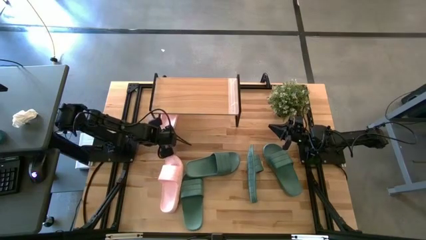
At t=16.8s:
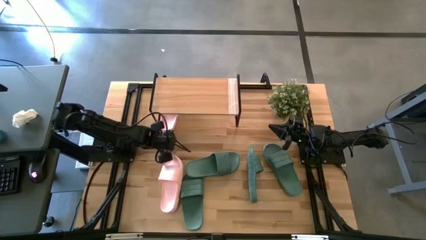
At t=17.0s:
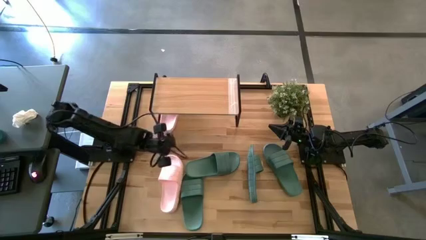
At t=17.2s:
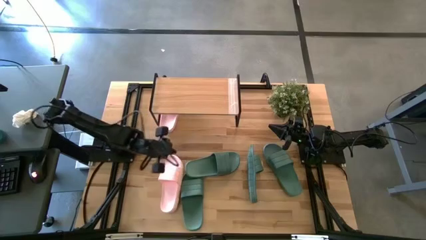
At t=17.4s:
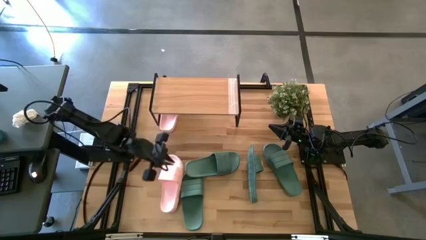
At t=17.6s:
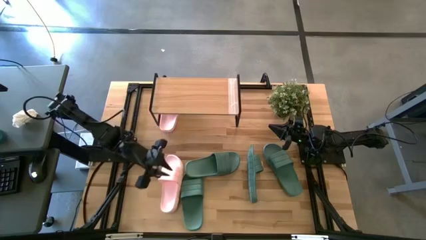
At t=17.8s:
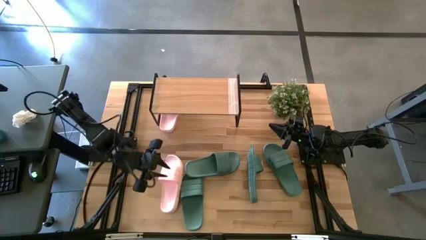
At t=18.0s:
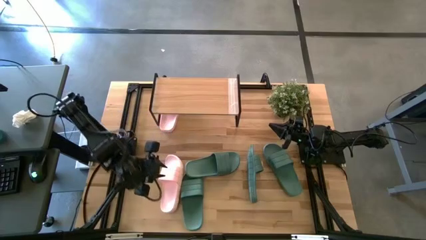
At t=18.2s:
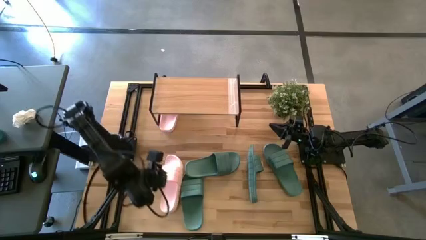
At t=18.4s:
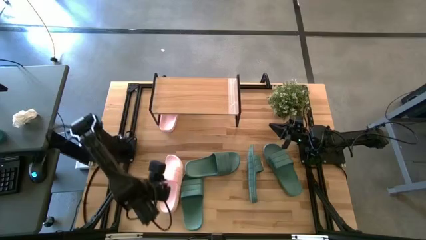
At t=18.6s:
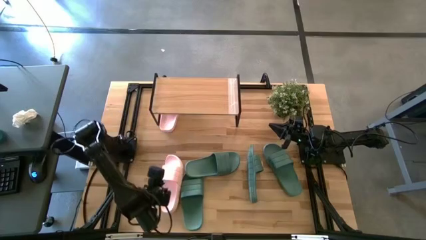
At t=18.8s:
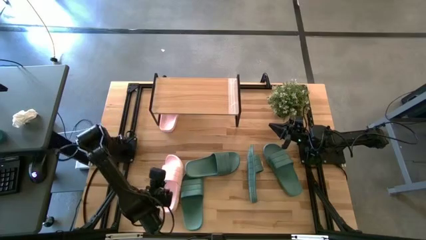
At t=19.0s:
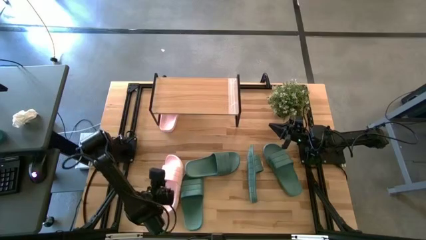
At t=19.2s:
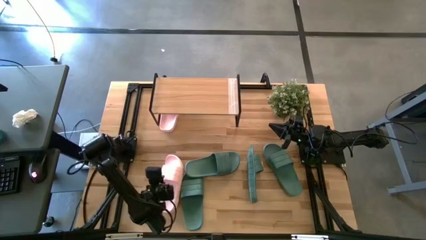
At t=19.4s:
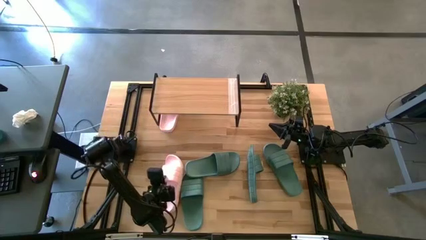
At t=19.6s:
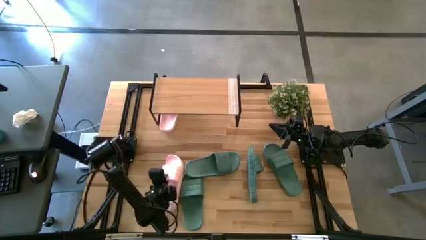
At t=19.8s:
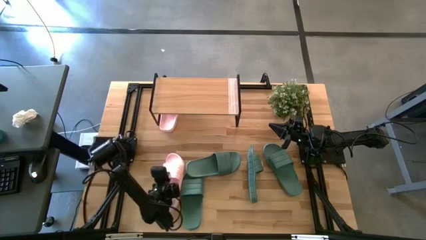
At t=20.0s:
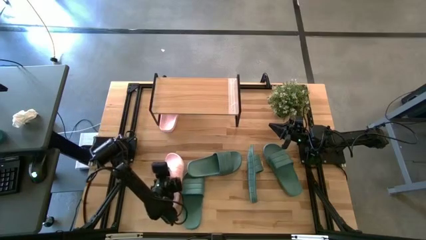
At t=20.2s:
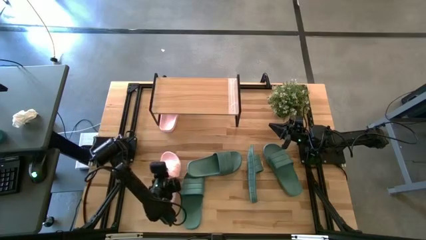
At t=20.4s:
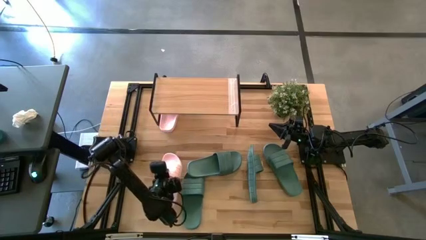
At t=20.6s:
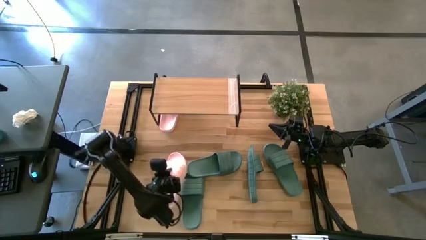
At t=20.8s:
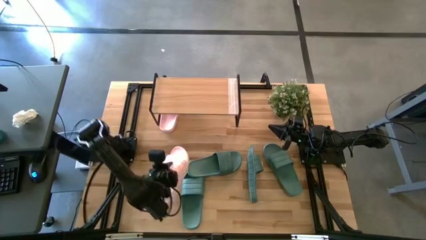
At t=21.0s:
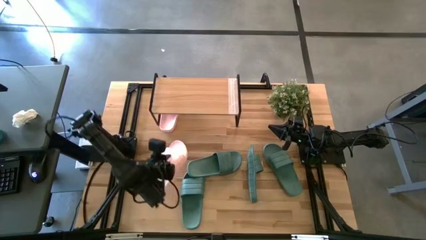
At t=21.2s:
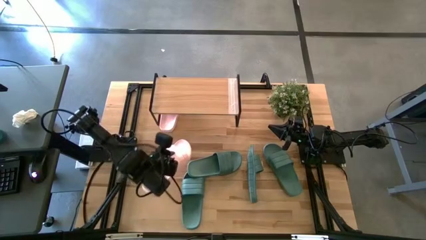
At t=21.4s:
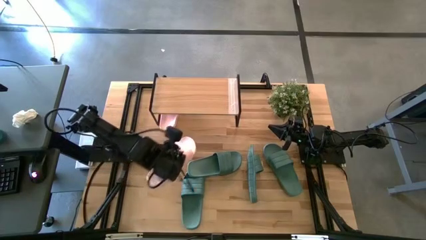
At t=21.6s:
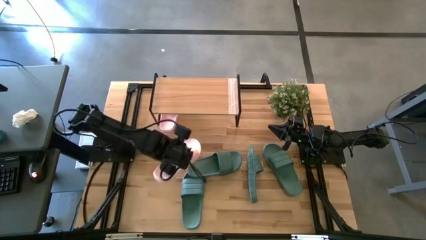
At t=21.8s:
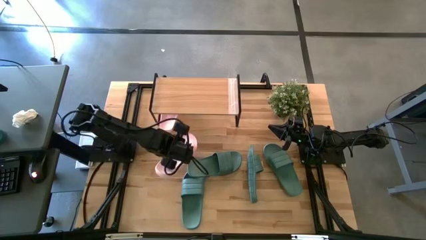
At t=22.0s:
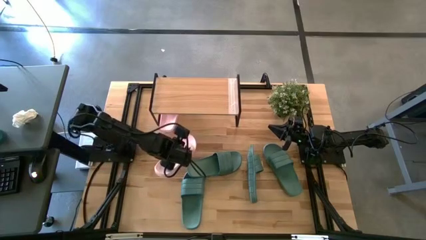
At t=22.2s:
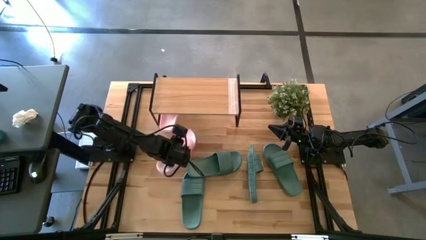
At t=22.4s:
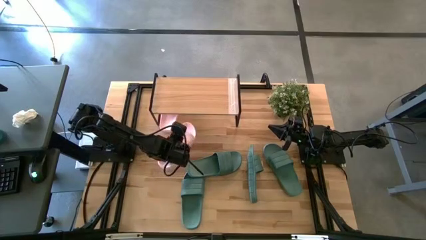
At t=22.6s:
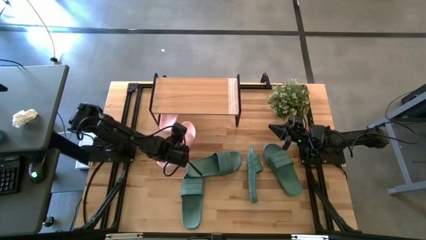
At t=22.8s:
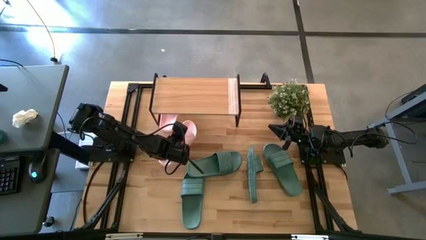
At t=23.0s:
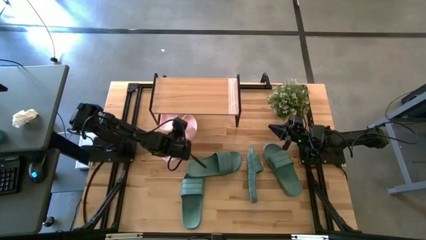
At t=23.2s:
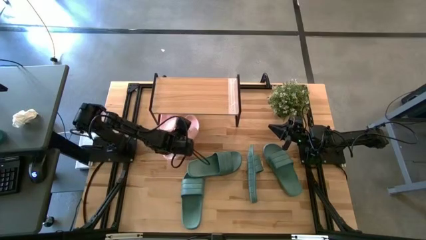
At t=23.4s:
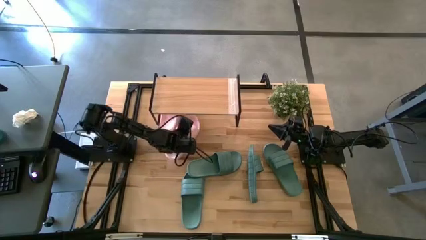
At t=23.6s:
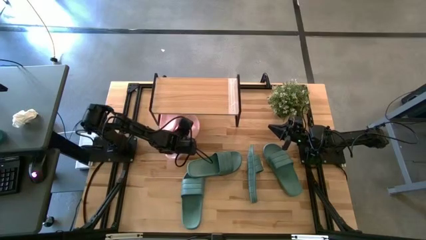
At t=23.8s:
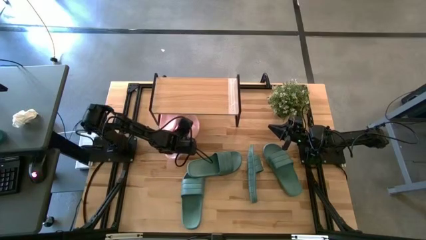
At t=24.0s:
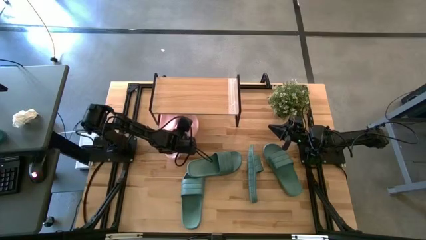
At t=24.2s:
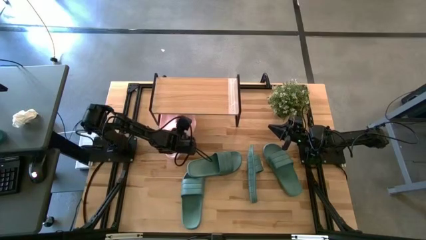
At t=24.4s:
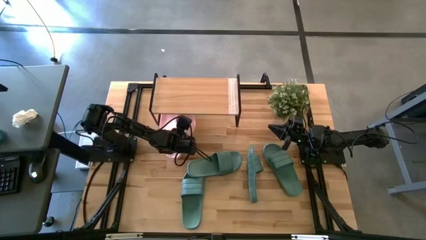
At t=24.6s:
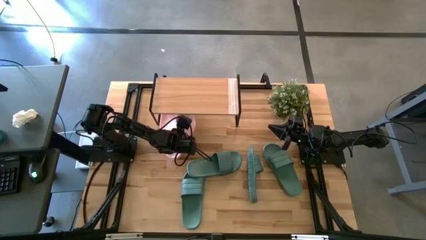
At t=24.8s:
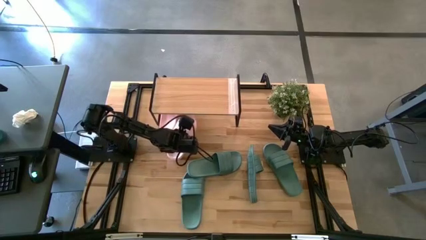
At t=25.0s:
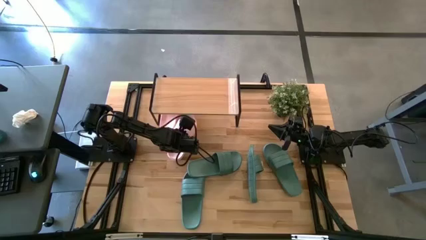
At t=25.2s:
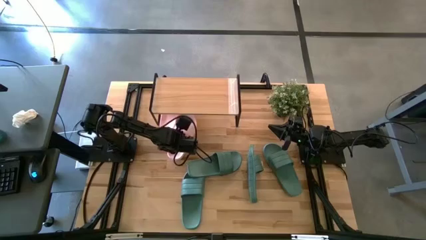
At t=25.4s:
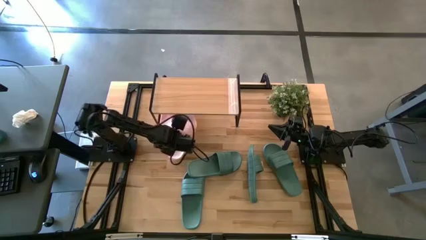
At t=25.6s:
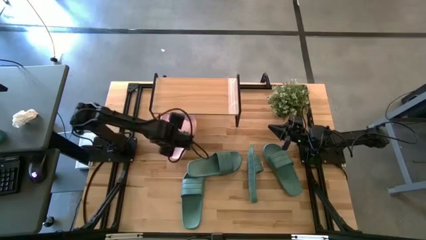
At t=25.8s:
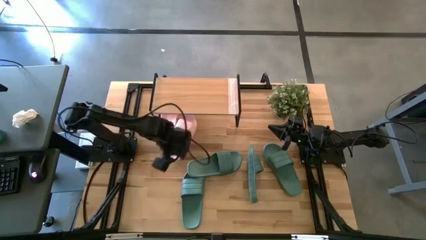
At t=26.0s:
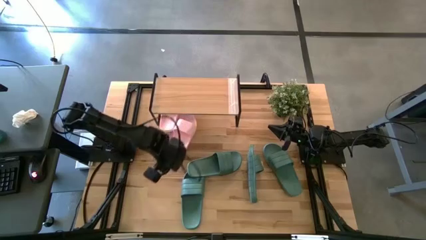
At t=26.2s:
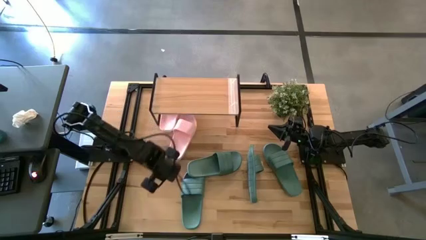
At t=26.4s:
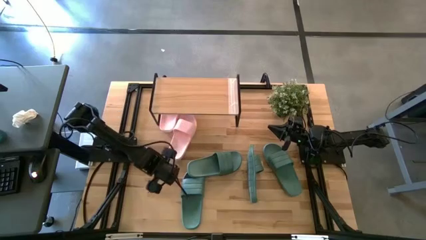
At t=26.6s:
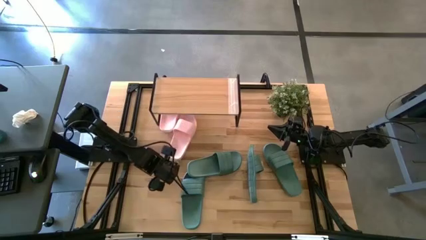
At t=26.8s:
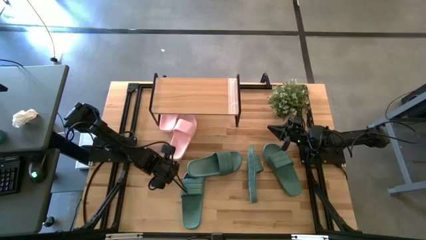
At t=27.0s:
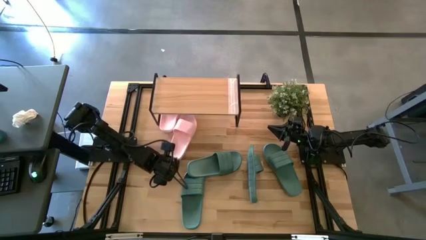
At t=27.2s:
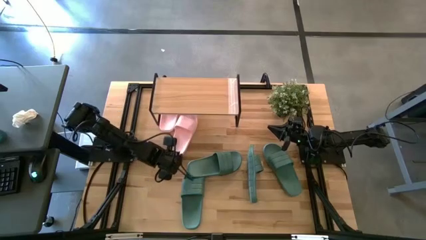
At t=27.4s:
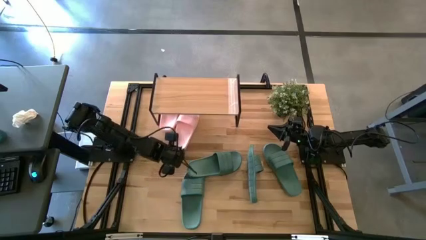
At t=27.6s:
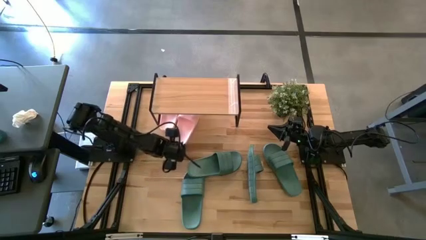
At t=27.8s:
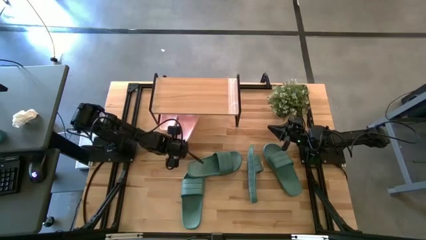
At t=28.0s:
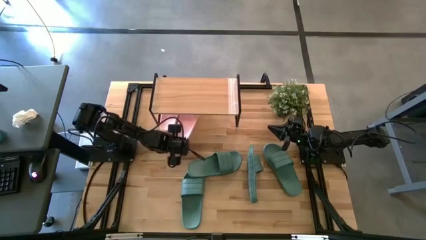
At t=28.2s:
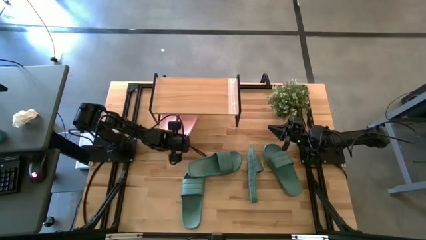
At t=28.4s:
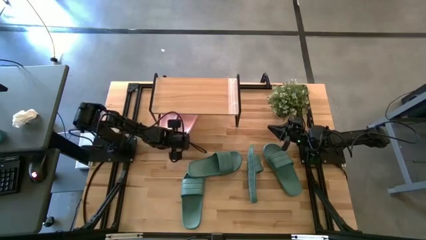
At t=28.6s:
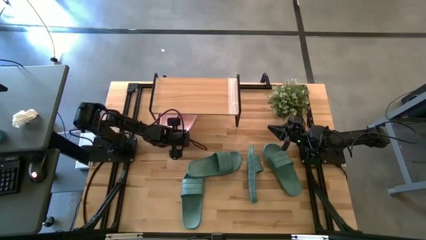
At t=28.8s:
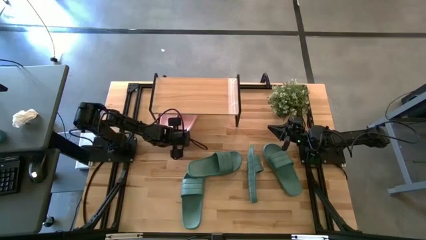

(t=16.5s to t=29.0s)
Task: Pick and place slides into the shelf
Put the right white slipper on the bottom shelf
